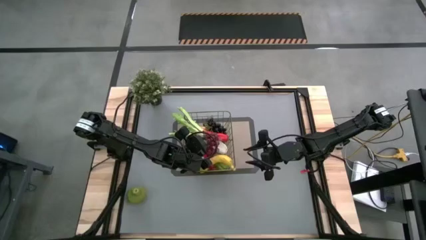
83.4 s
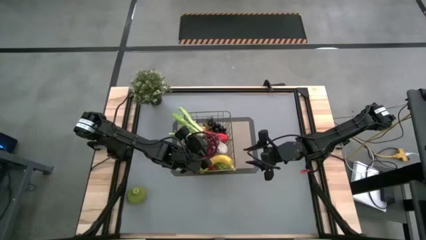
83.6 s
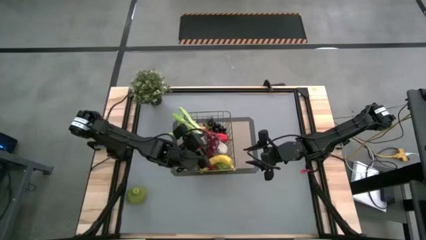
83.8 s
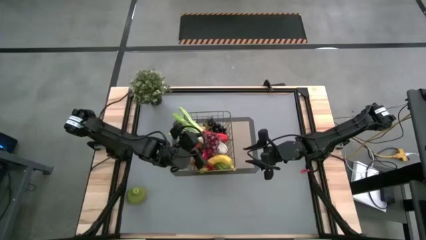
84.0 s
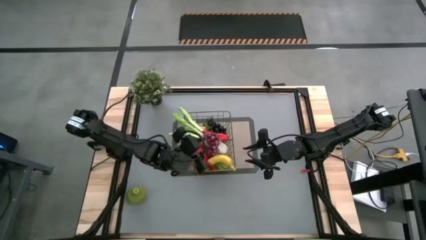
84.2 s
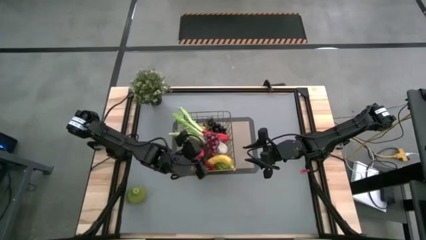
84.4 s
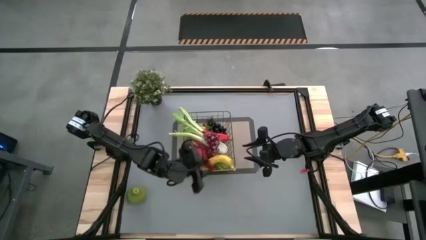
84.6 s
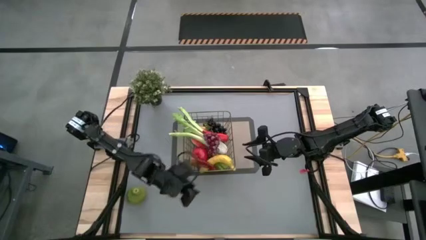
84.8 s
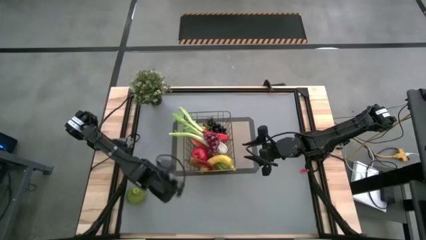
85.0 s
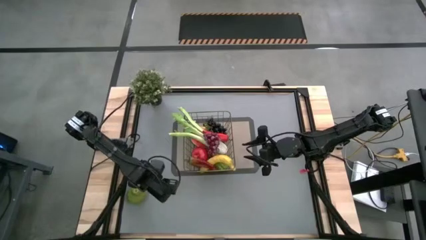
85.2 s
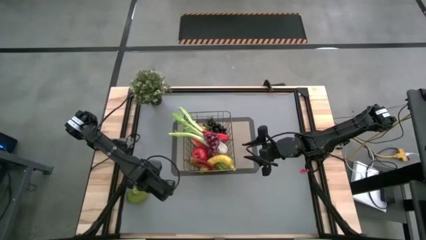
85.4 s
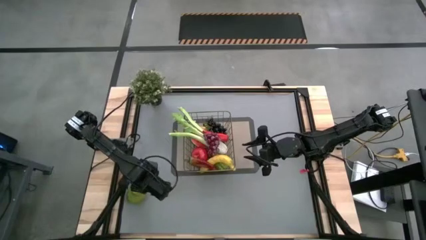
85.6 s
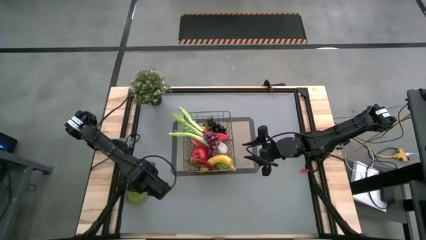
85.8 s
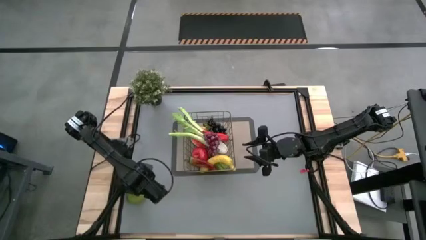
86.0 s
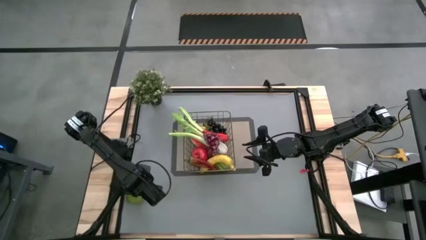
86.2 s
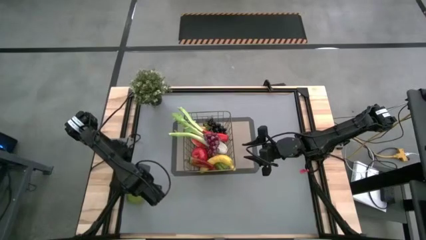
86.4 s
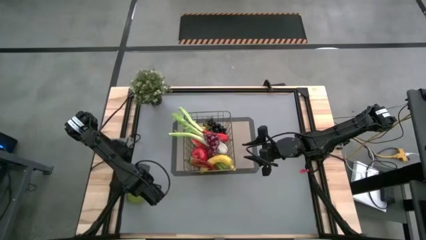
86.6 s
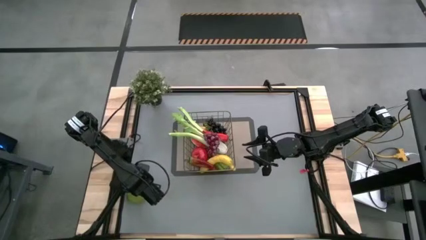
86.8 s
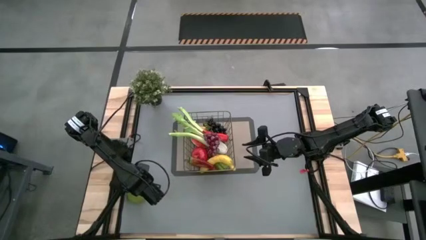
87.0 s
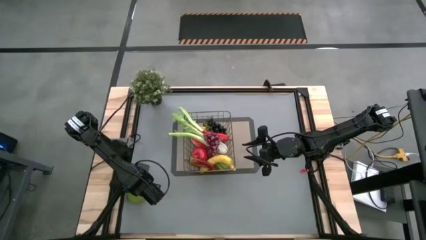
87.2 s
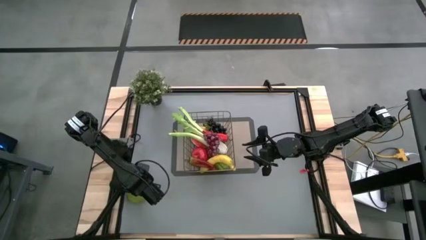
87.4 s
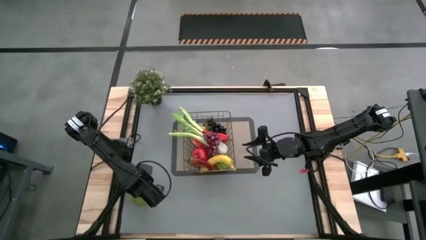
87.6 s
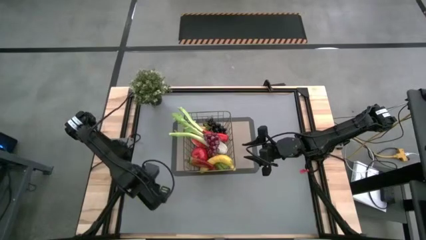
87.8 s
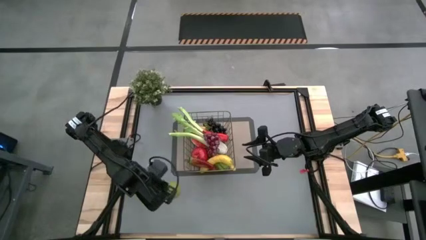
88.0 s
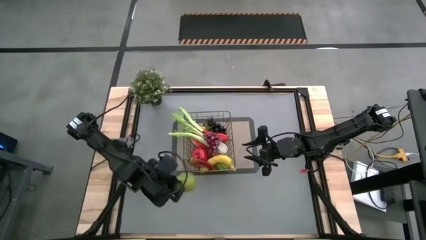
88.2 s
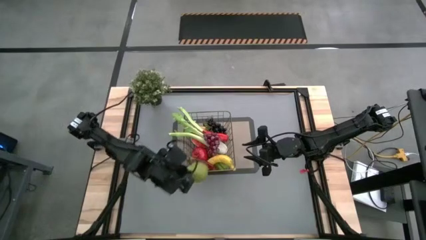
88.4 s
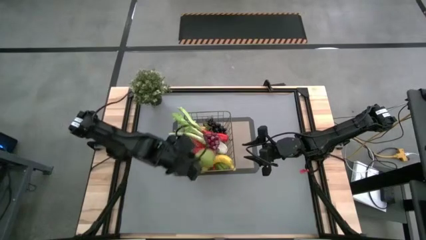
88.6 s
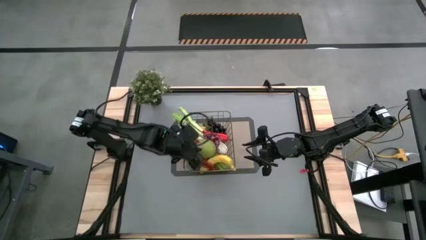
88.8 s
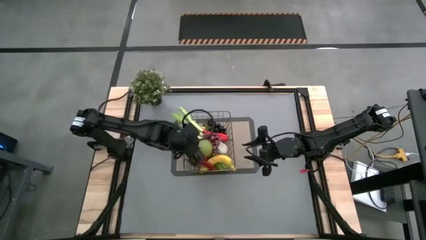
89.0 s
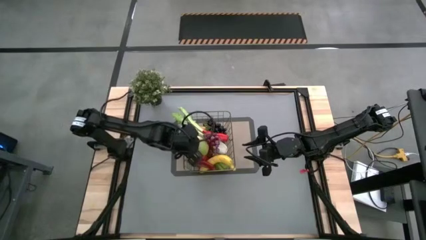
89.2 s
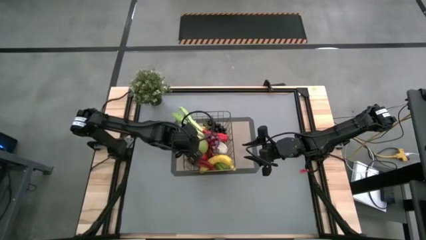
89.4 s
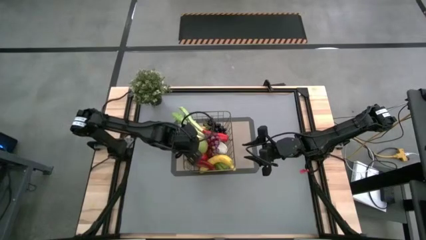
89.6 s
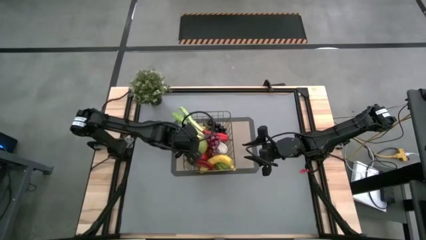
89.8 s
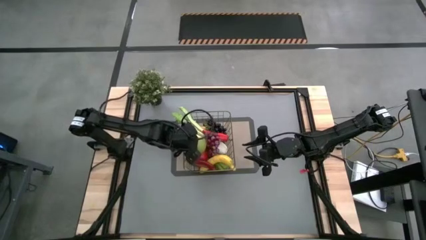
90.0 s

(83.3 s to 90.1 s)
Task: Build produce basket
Put the green pear into the wire basket

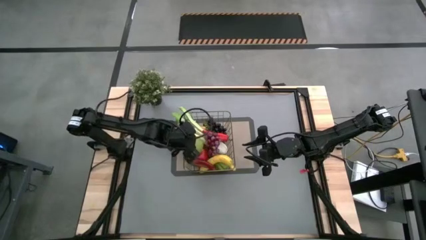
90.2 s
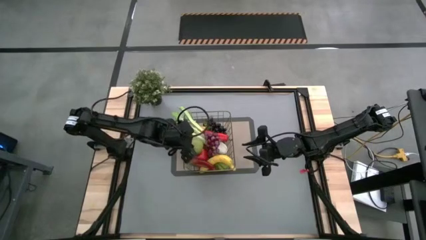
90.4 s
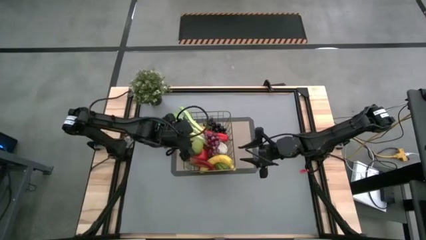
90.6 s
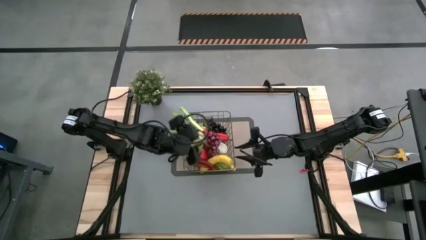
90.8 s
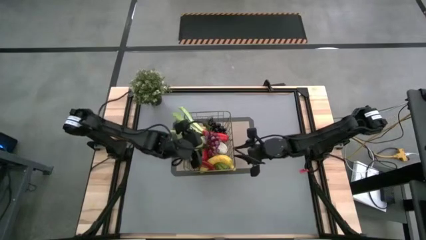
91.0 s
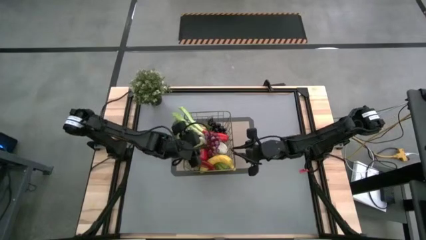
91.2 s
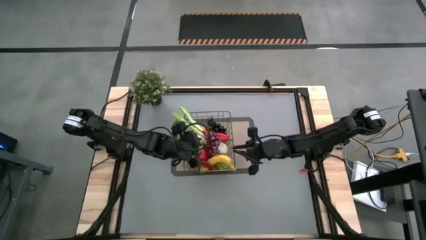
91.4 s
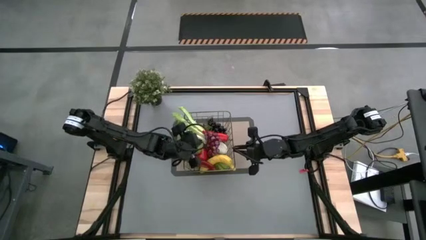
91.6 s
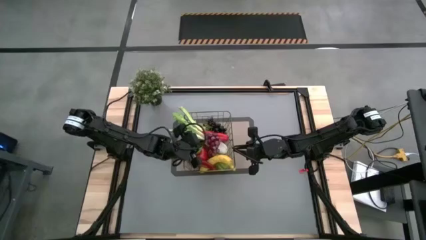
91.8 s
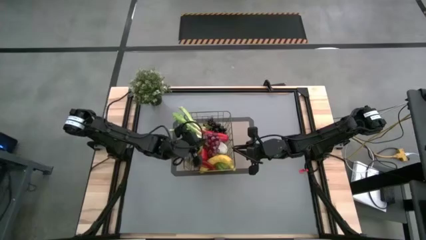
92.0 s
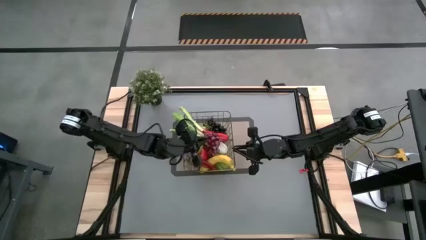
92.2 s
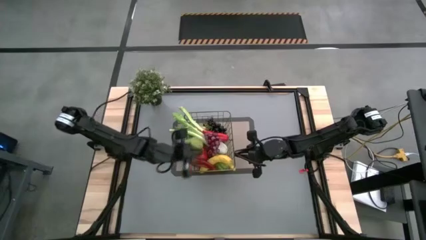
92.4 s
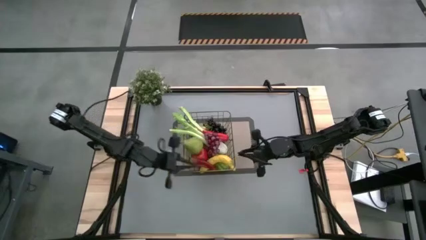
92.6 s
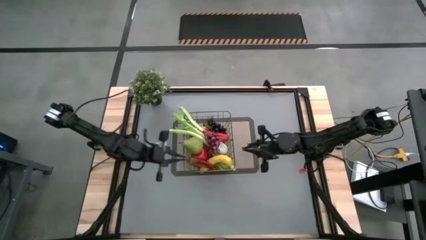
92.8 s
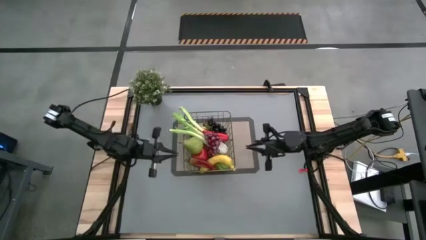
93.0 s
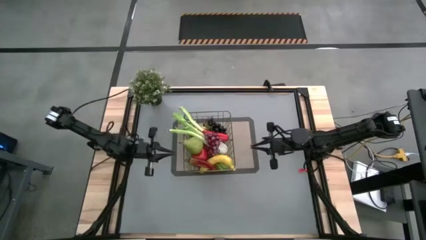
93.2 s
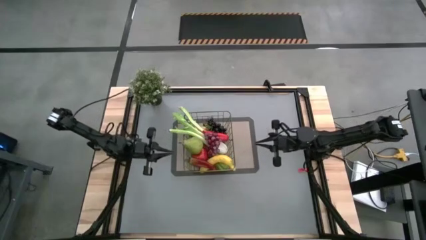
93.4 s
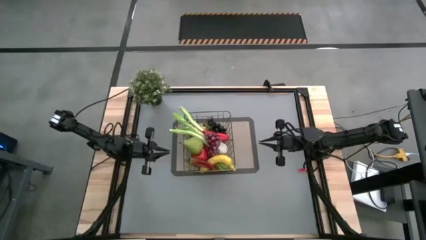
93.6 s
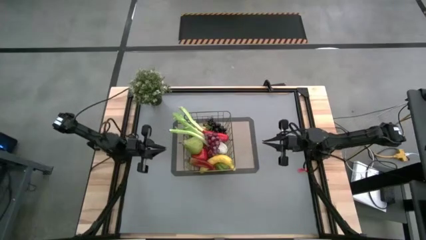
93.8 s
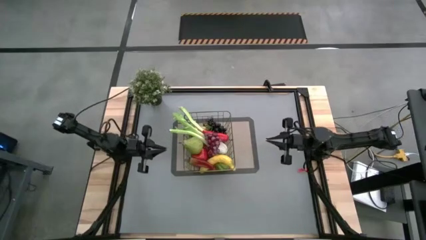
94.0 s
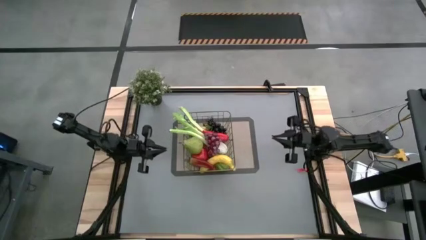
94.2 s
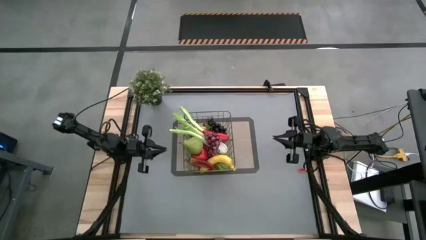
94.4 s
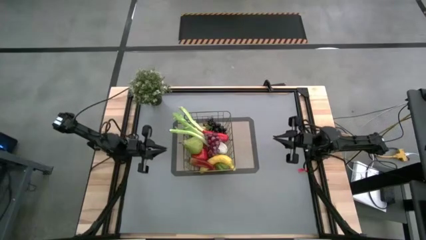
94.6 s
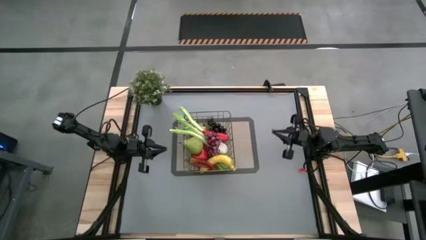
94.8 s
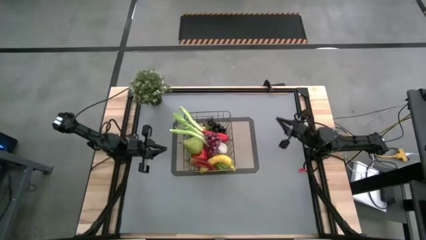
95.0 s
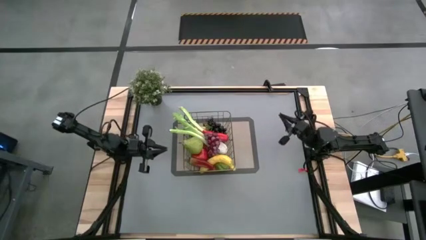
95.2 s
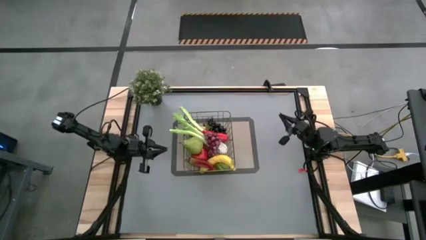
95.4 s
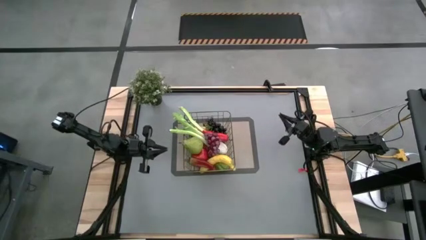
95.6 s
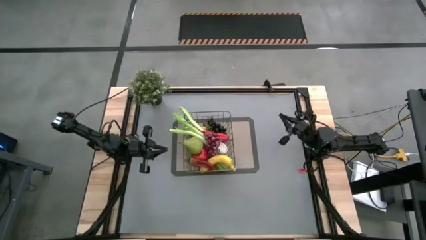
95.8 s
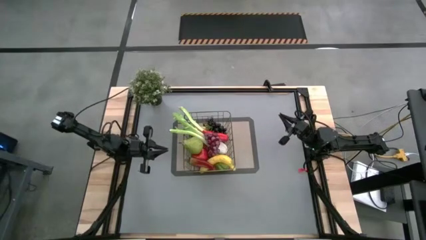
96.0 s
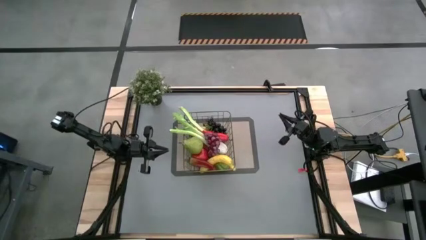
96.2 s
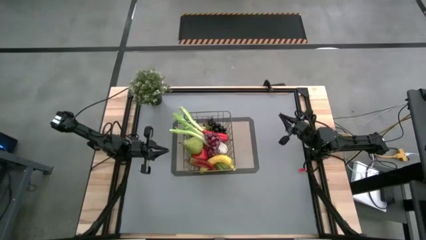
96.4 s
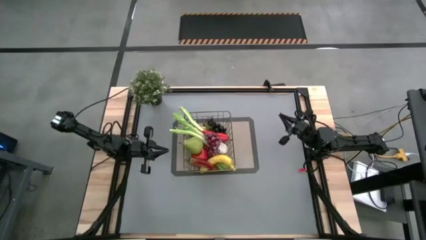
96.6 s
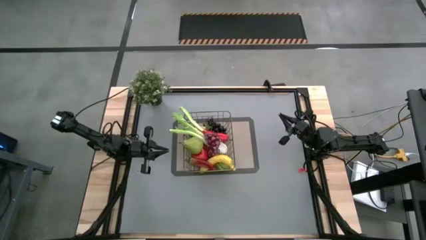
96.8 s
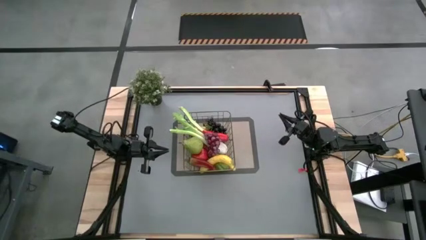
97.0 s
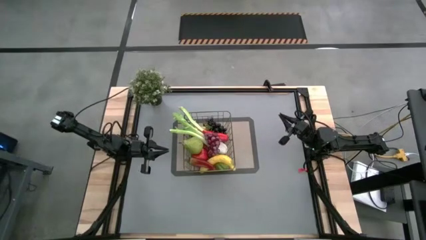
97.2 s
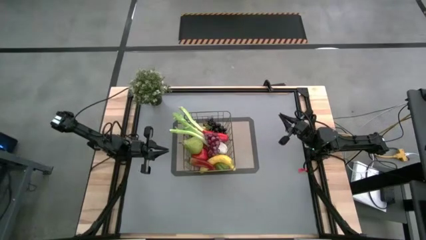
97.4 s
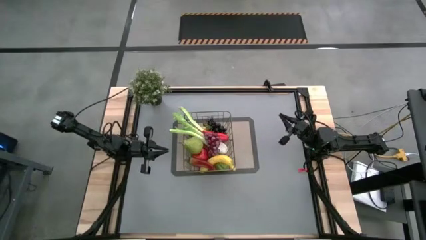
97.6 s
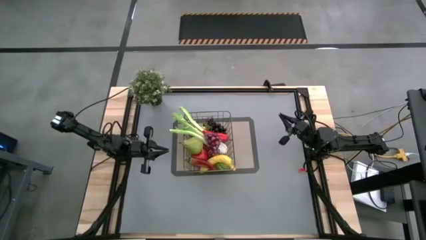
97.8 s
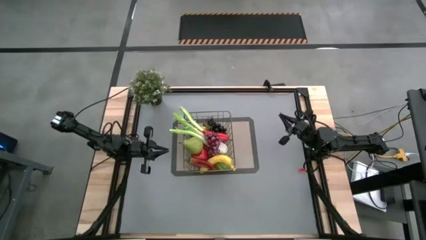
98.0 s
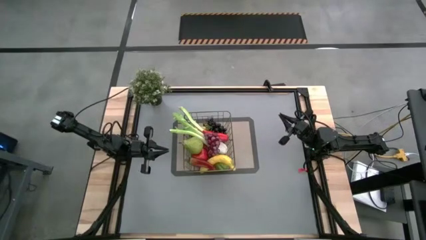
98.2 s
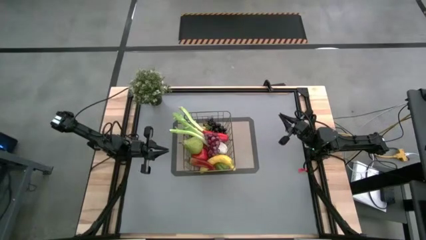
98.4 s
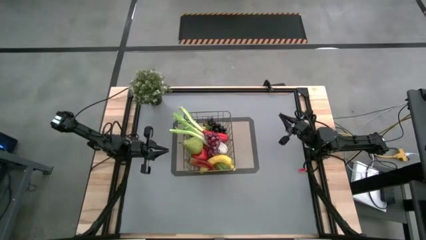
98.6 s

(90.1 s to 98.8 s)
Return to Home Position
